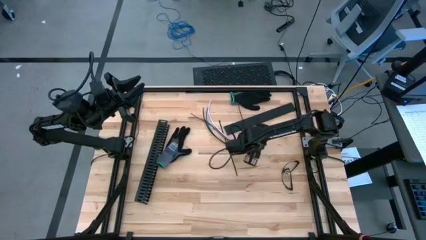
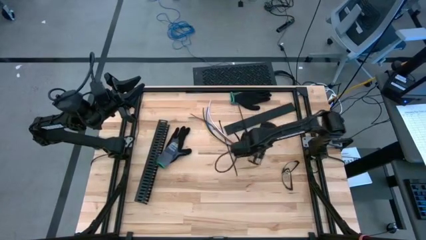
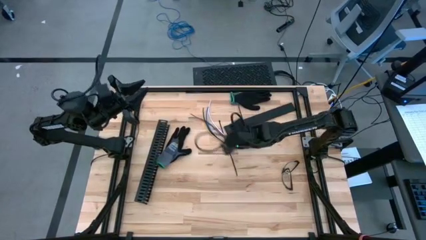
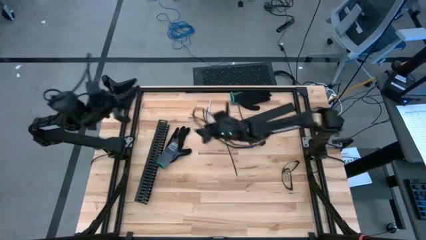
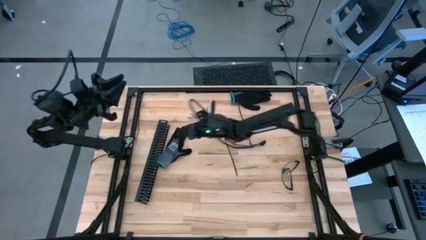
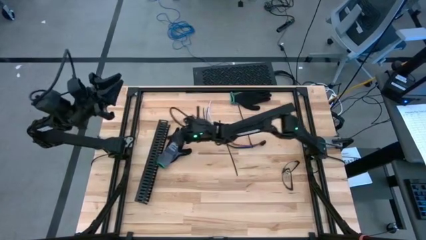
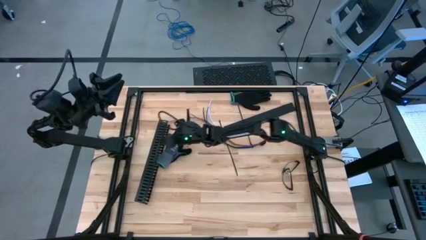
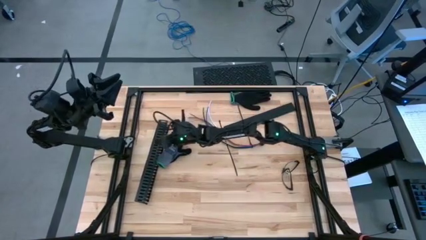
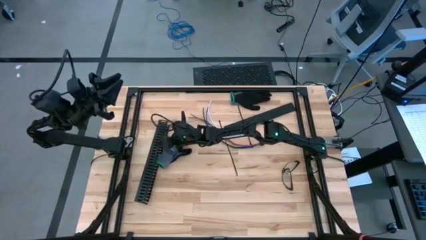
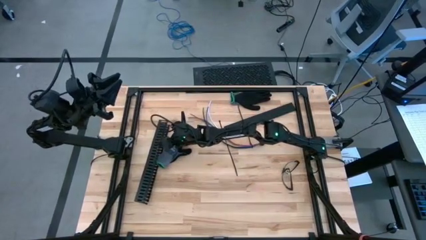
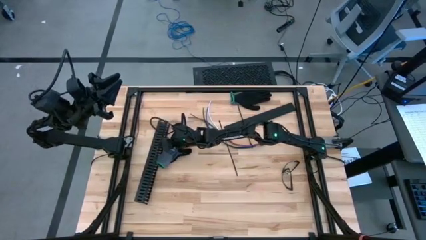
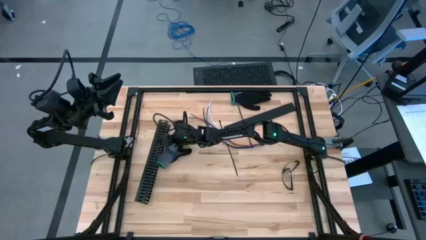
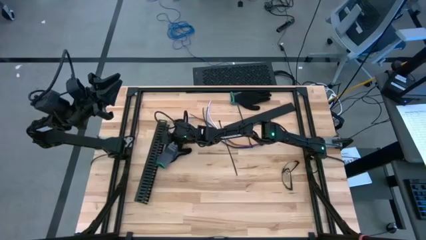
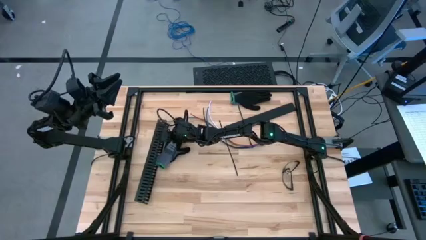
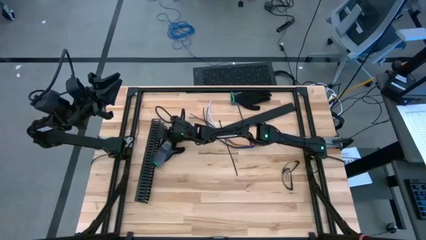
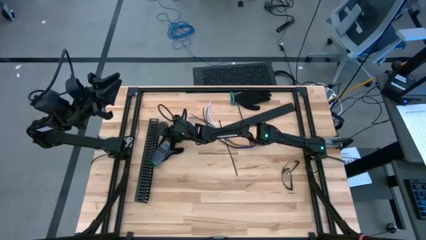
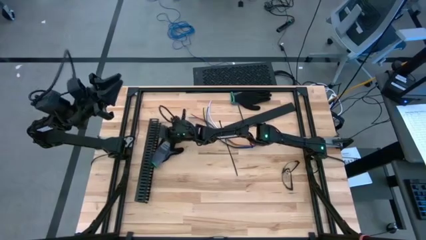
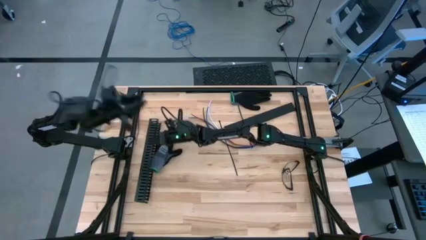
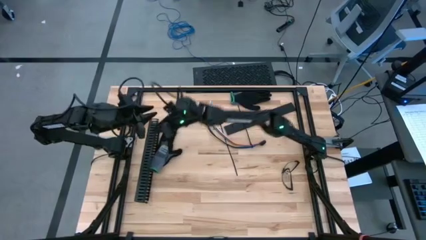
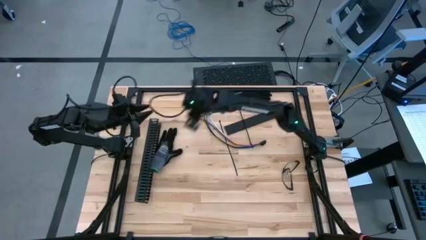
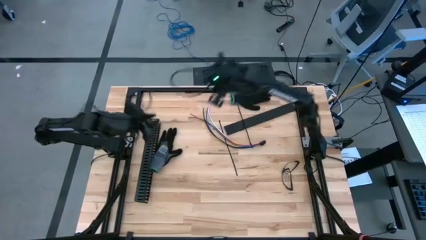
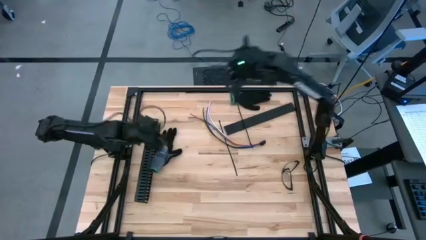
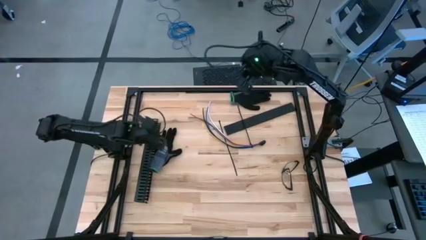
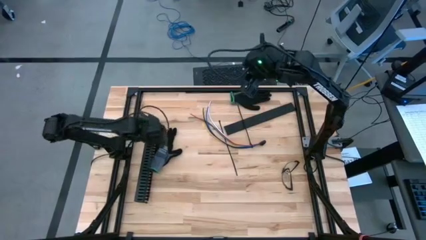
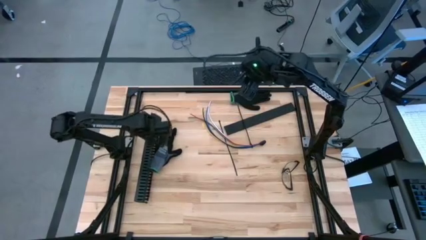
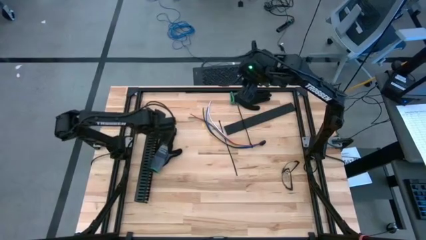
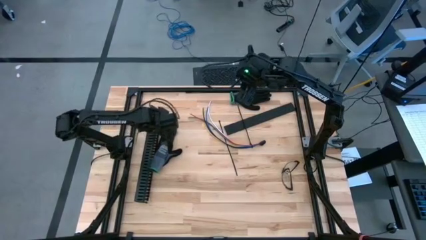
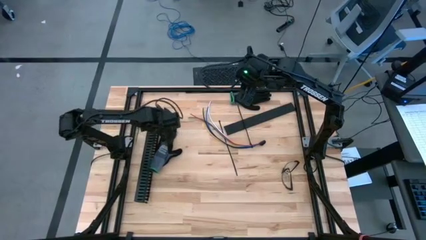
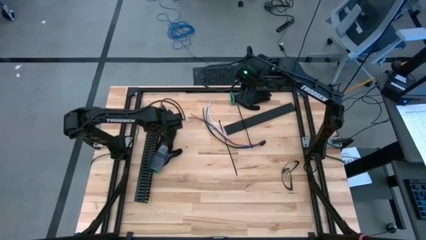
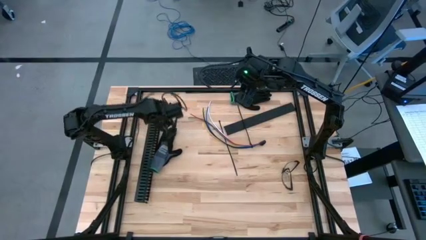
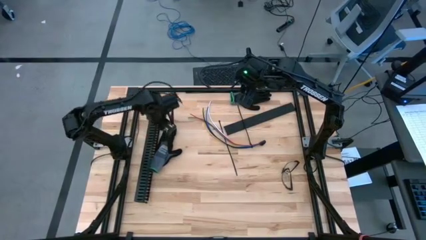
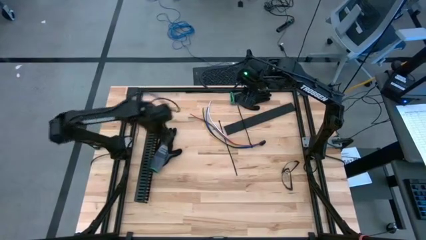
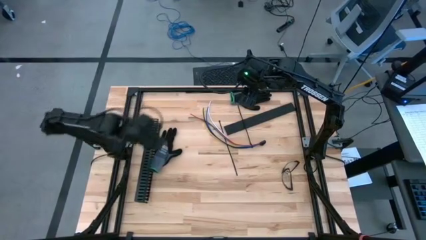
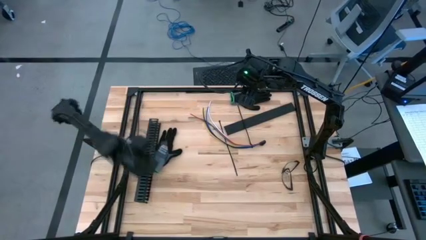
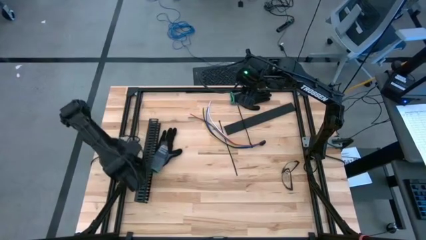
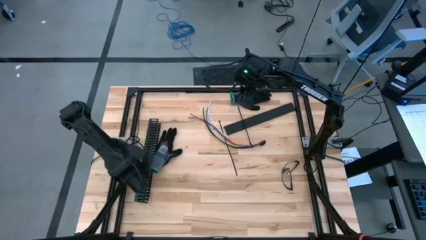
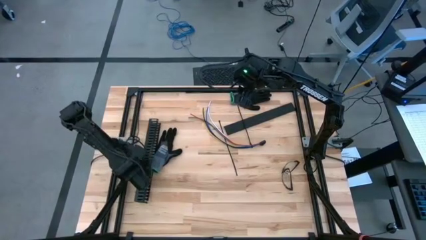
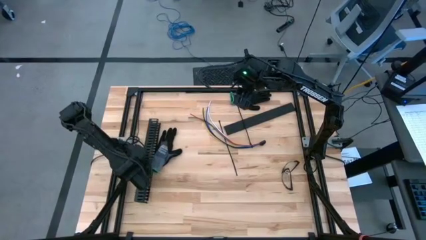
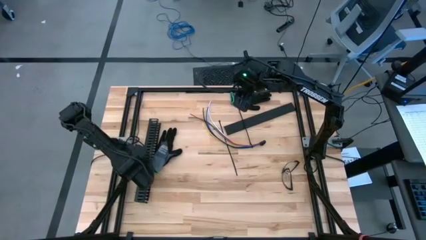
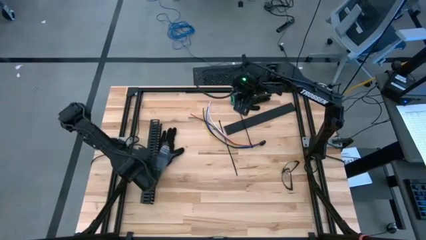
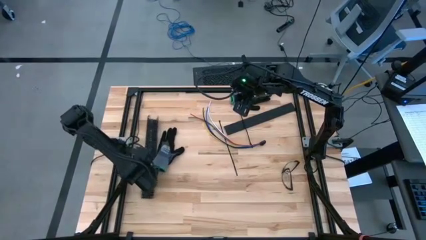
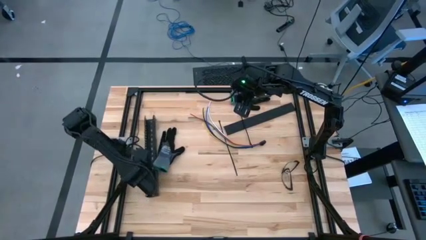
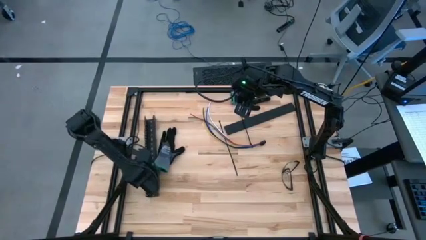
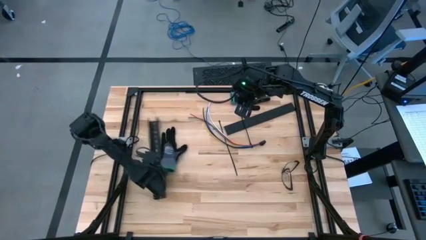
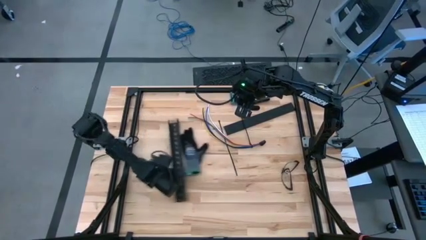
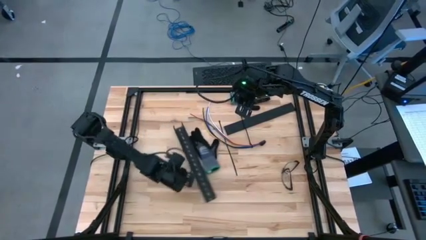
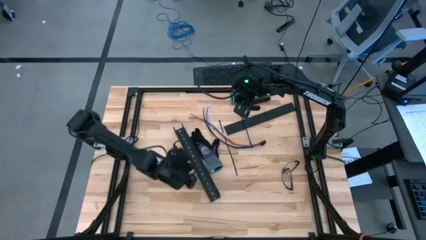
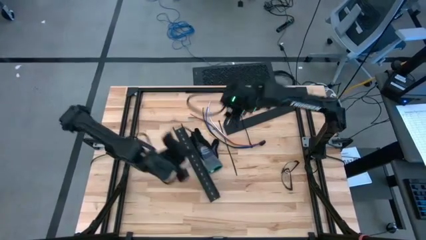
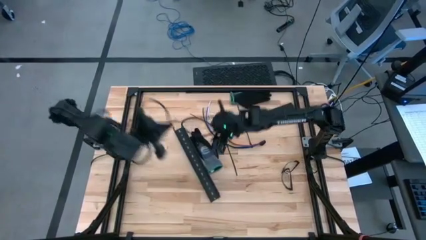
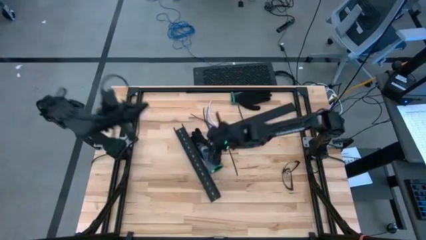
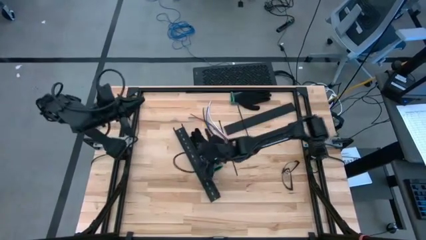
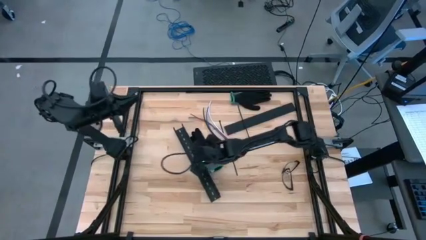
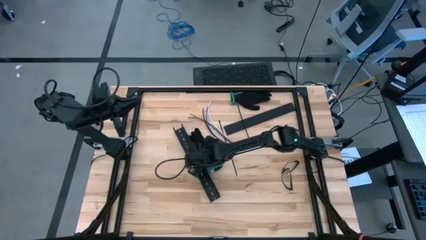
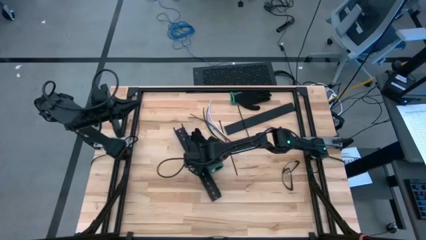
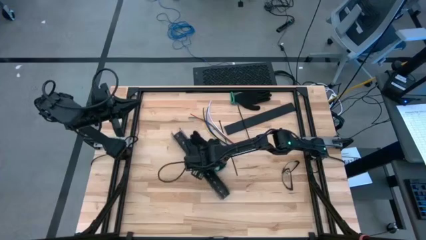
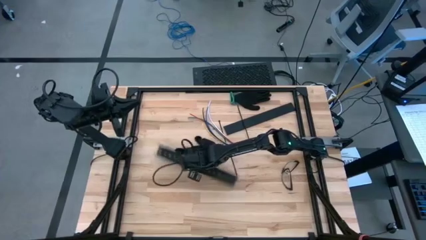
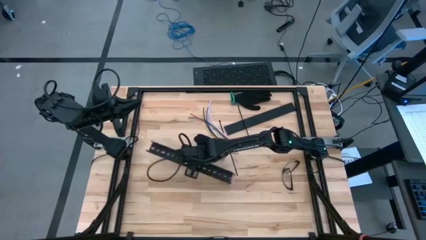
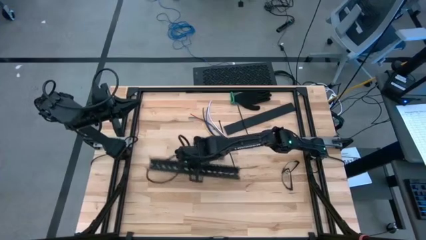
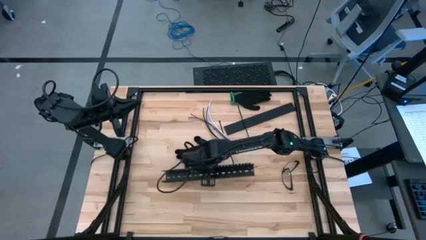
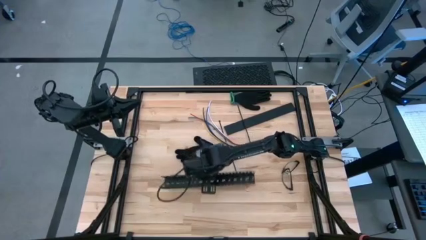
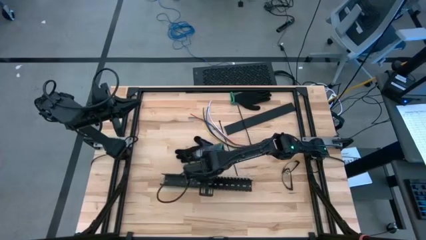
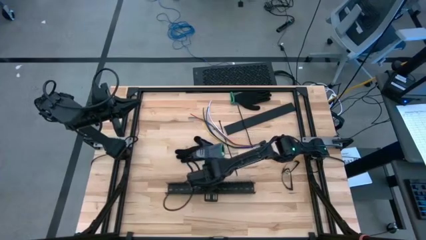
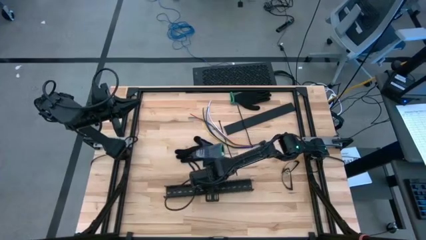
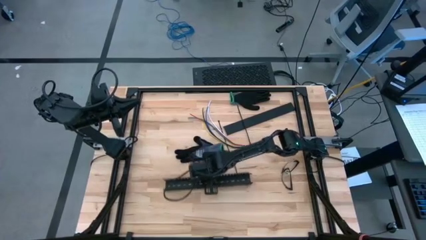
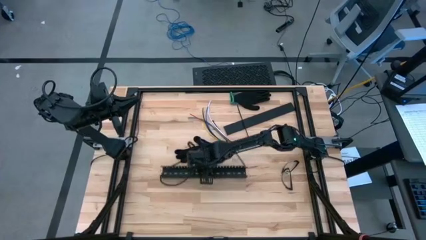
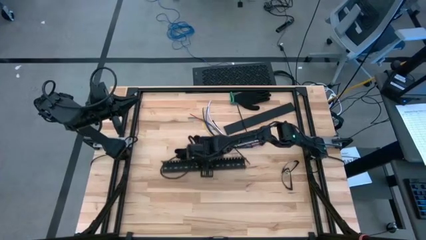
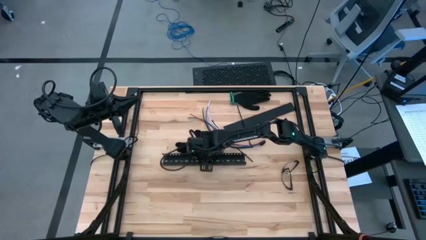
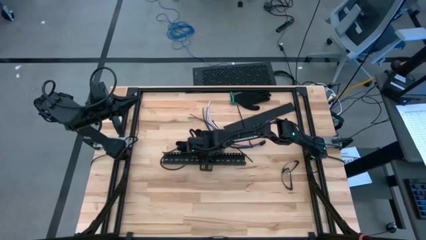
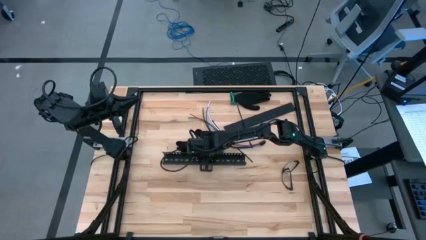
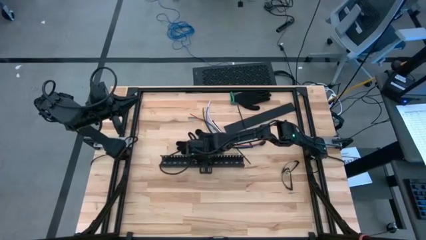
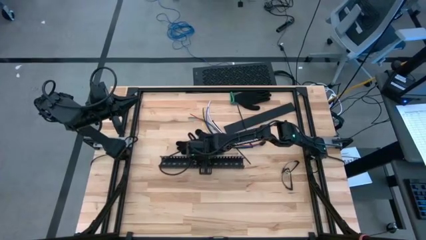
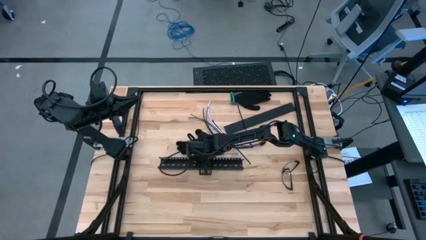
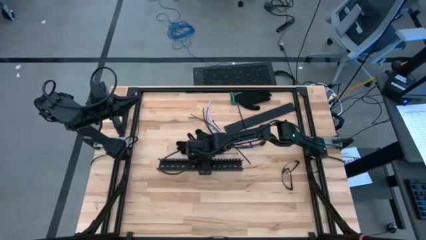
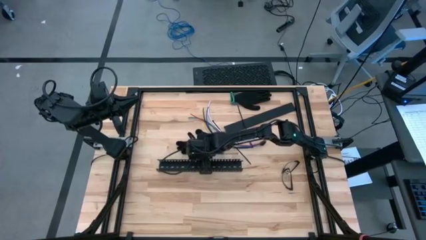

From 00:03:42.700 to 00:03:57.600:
Task: Ziptie cables
Prepare the black cable duct
